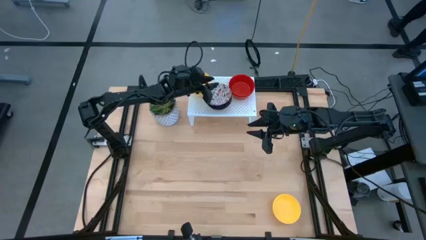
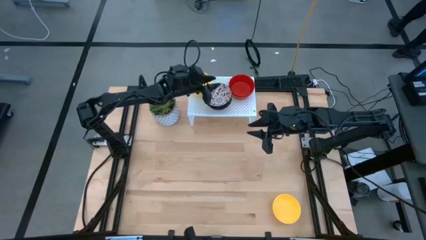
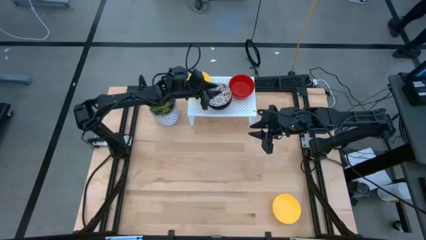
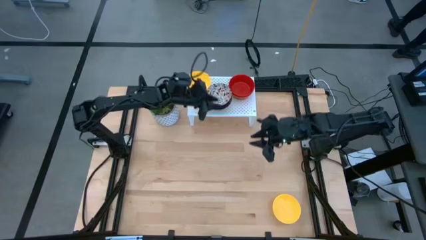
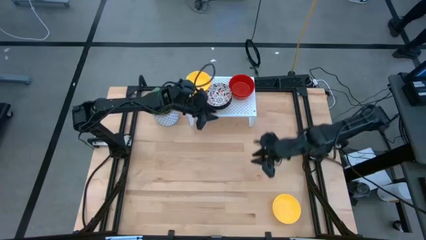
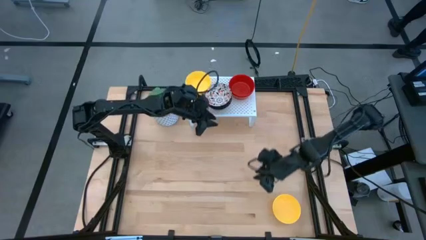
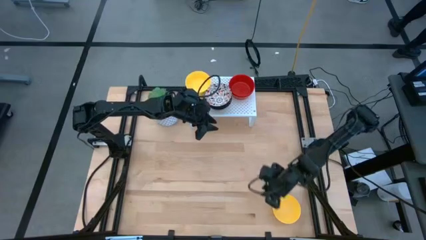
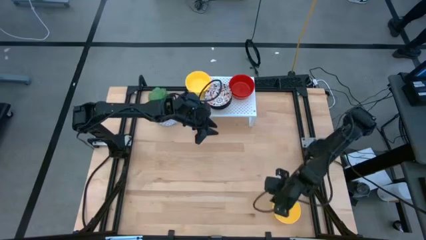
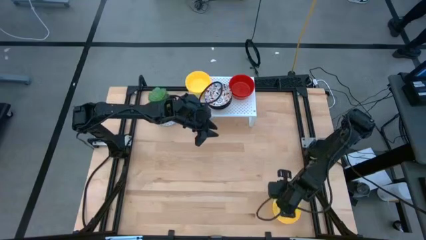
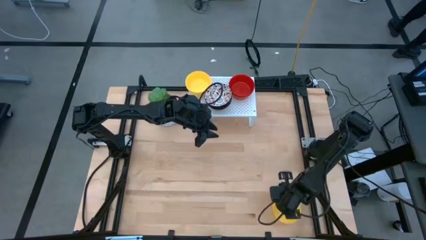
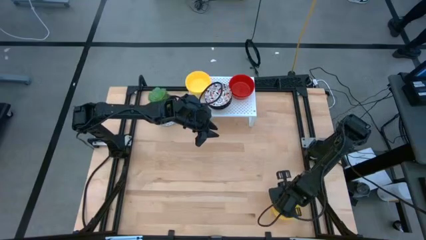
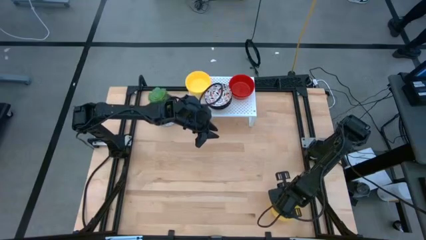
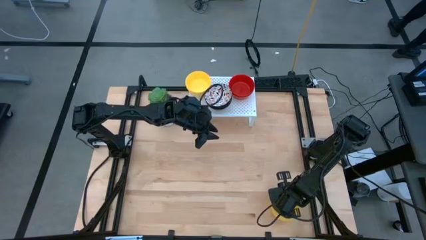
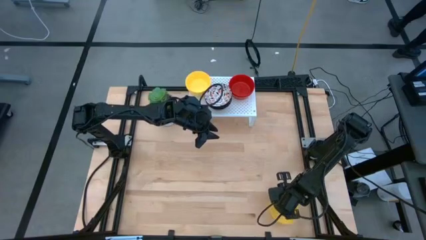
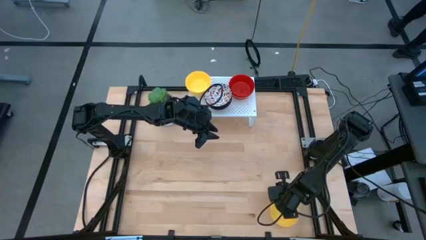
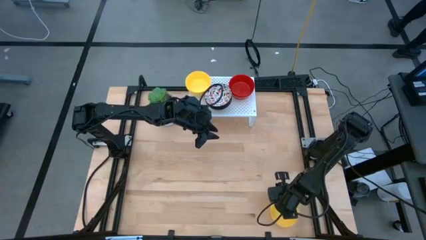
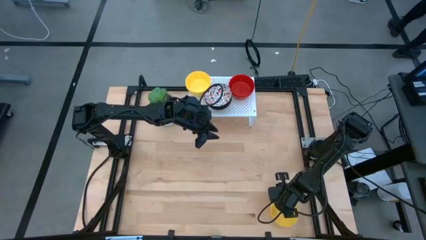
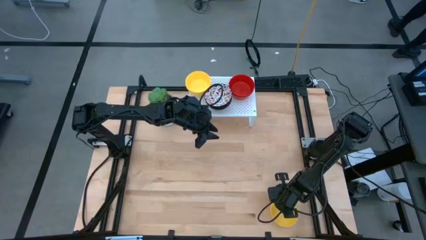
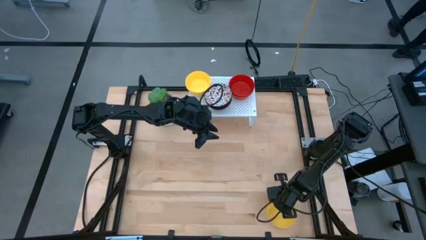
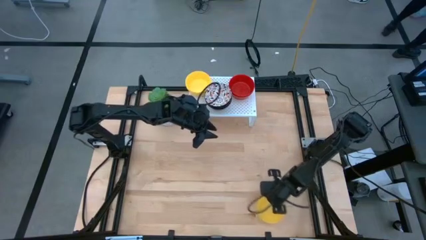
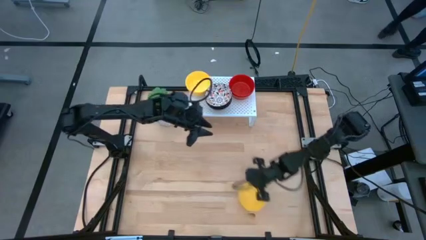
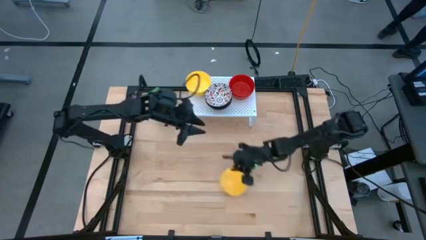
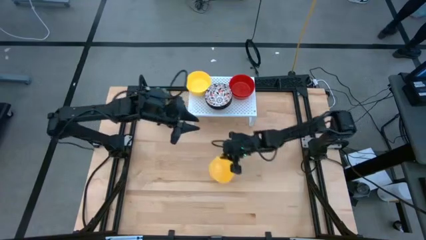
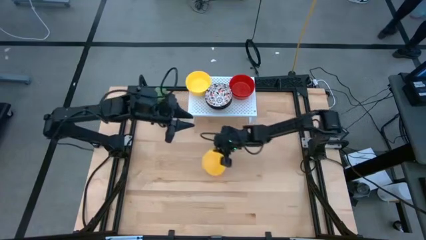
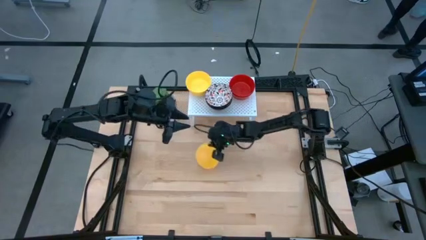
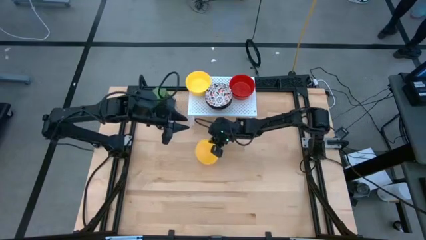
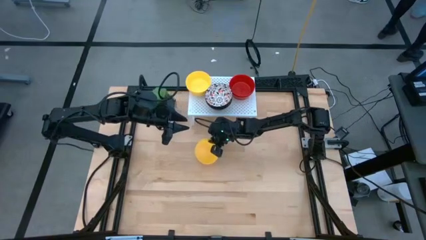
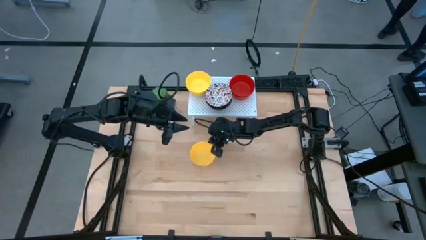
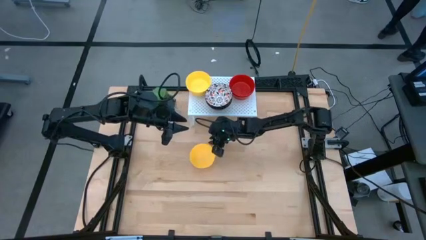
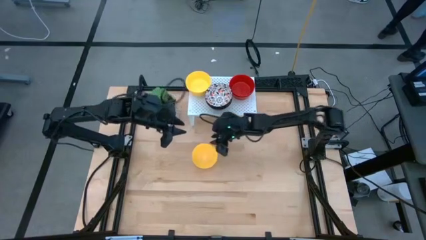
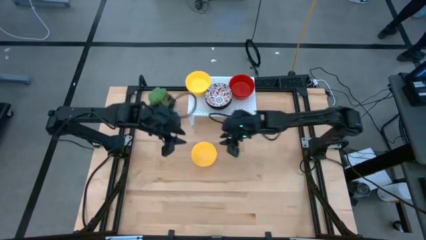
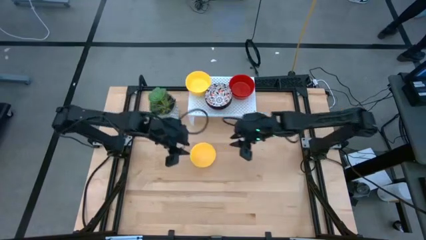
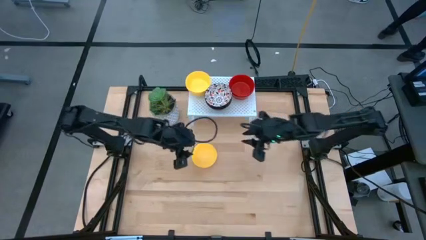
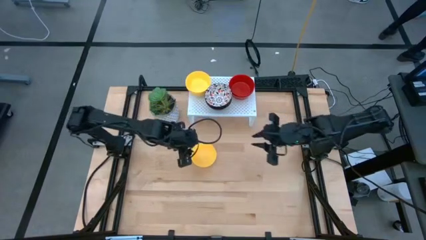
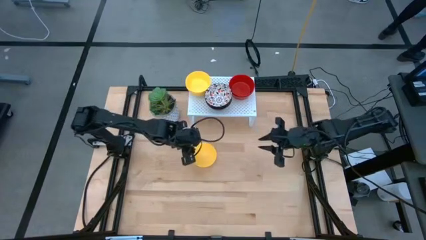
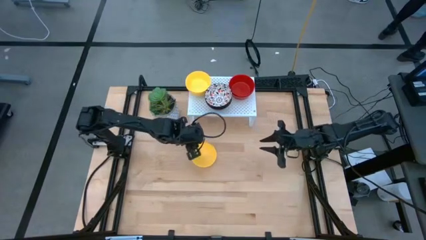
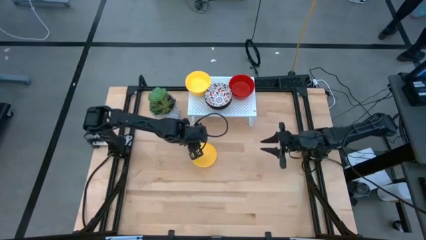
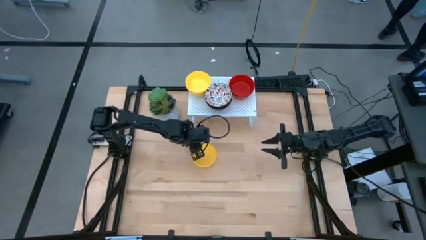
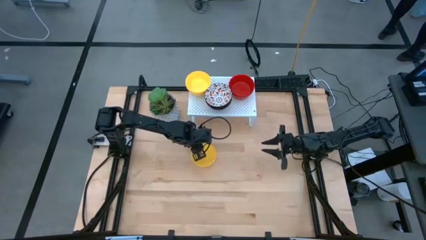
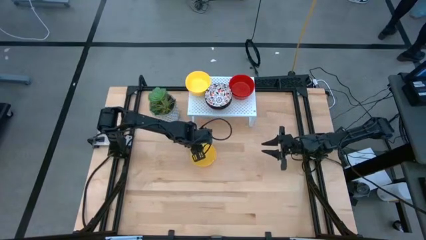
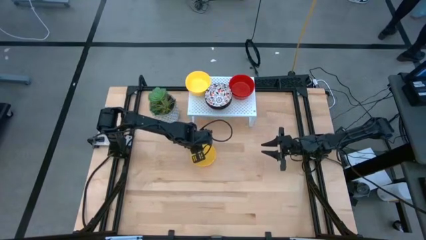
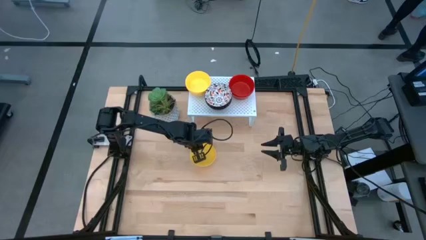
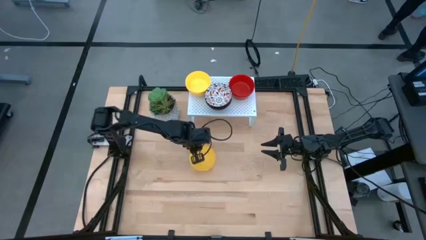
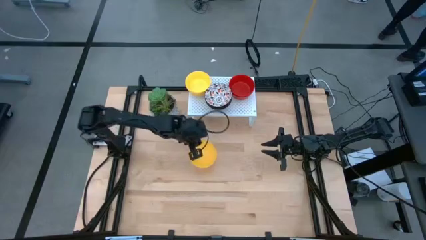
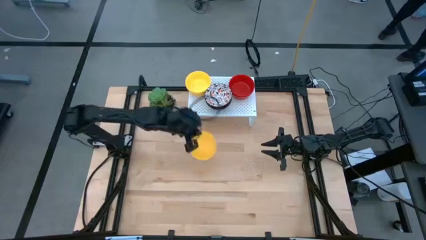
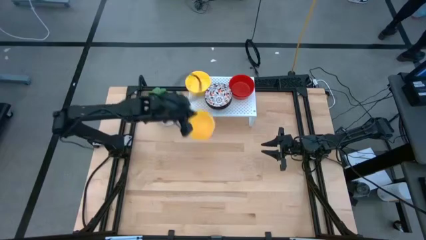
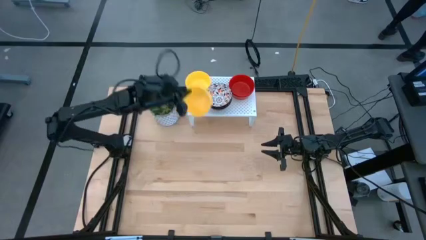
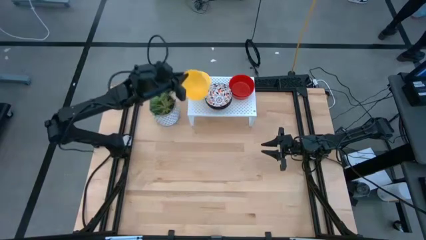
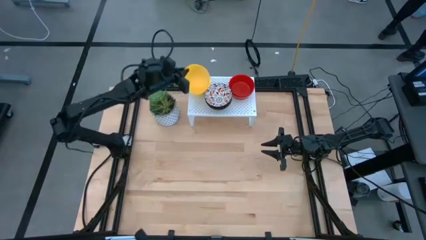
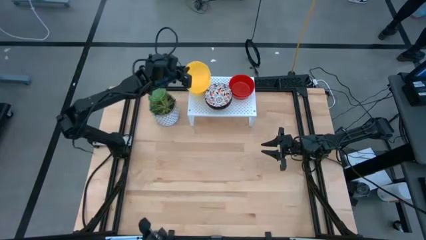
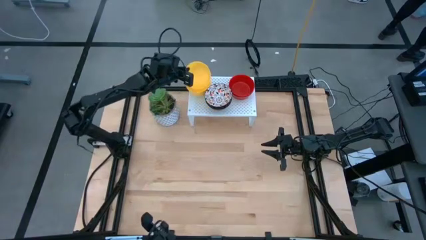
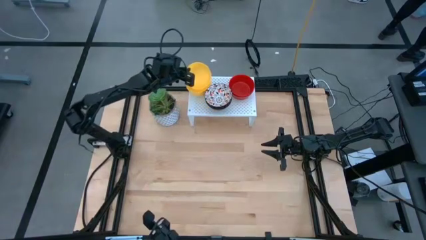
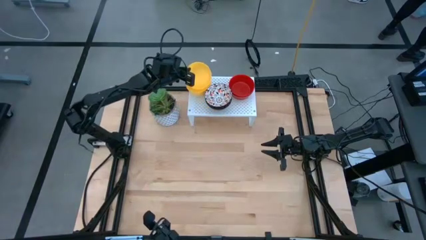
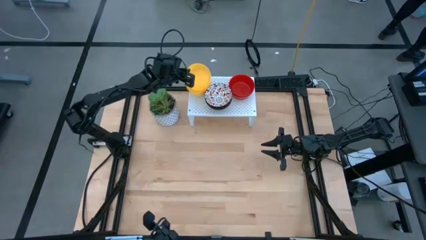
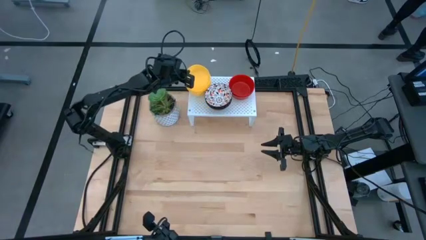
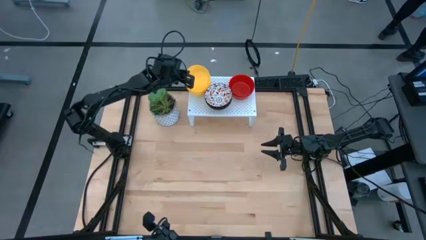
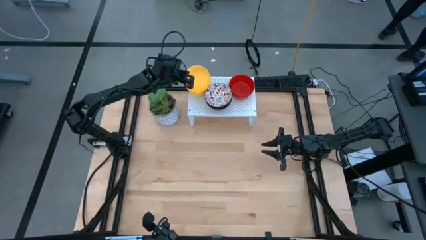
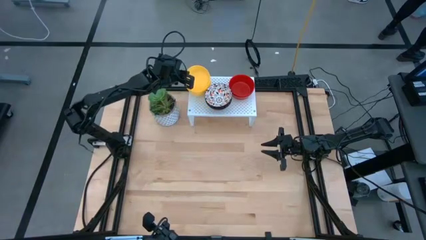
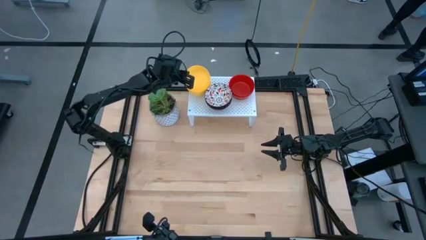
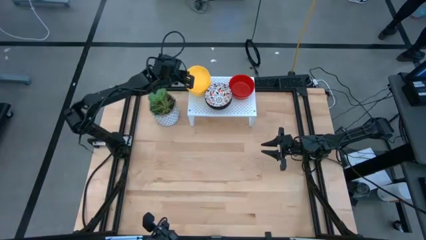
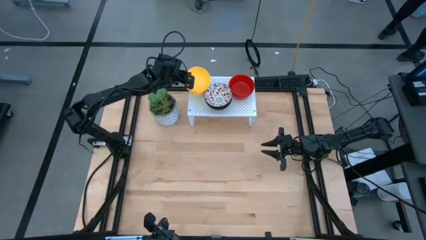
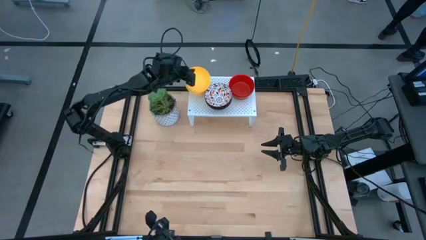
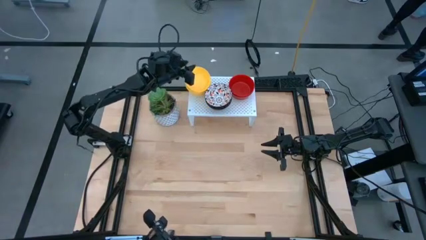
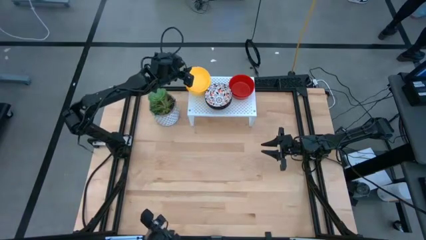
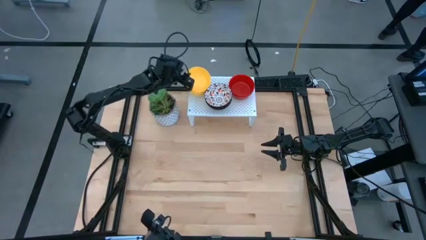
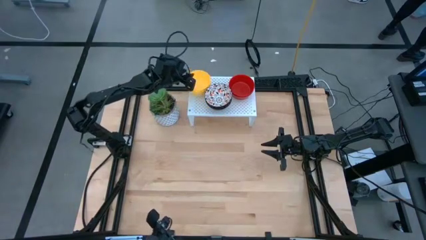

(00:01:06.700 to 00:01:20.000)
Task: Pick & Place Mini bowls
Stack the yellow bowl on top of the yellow bowl on the shelf
